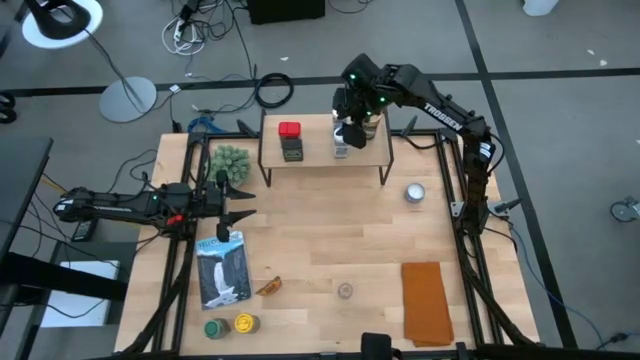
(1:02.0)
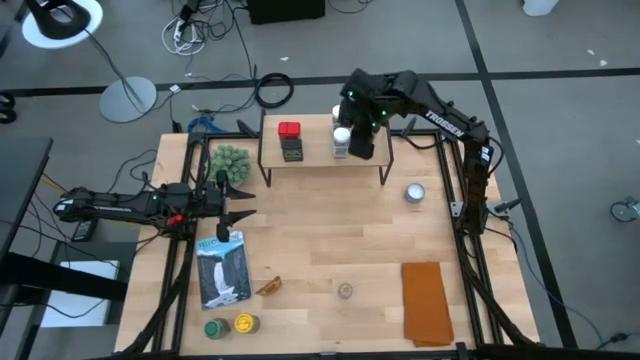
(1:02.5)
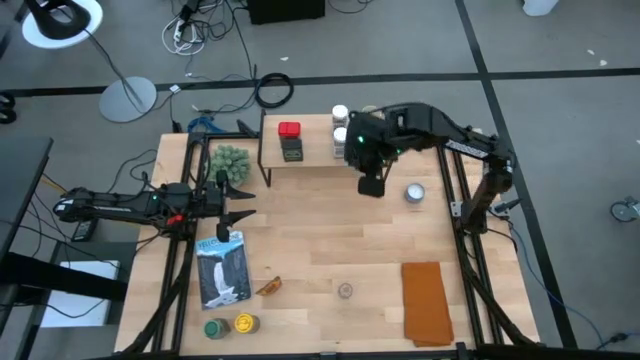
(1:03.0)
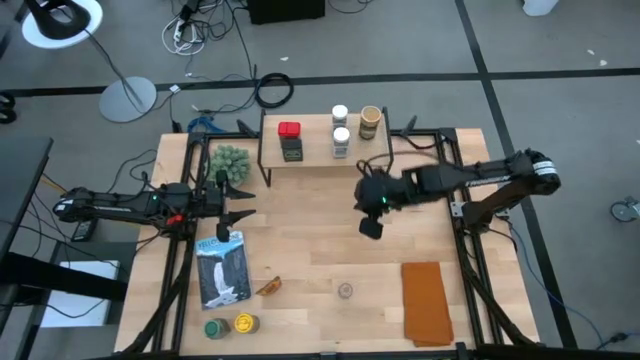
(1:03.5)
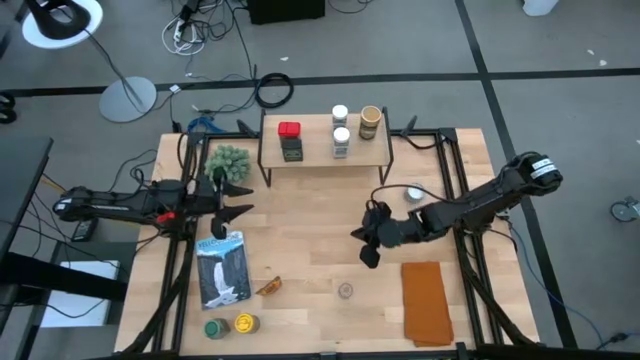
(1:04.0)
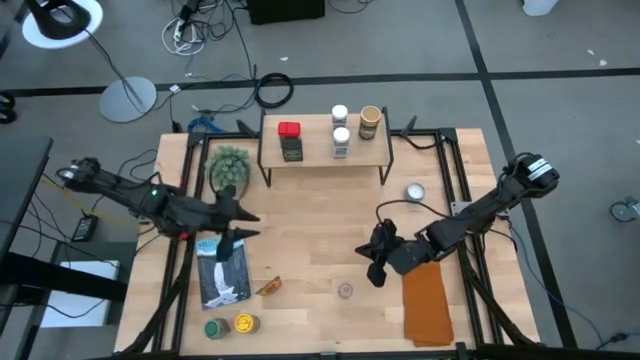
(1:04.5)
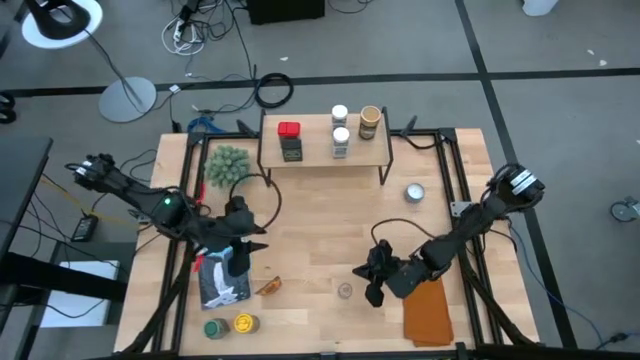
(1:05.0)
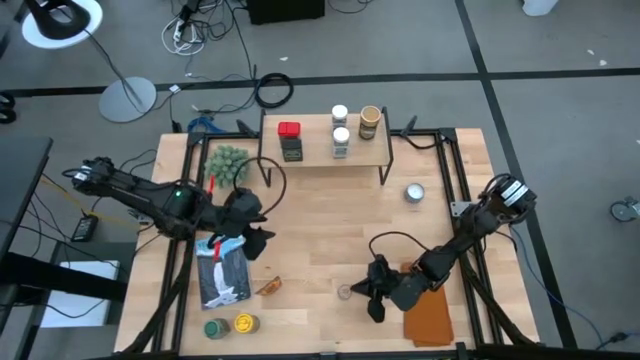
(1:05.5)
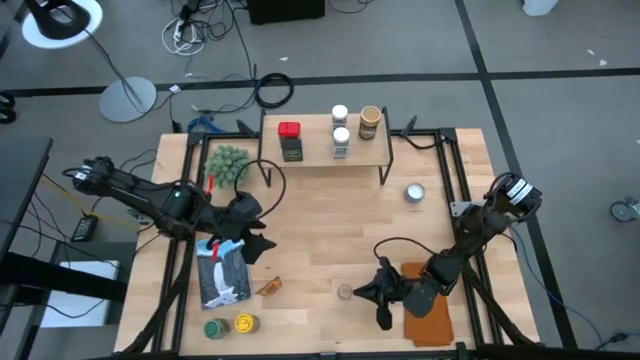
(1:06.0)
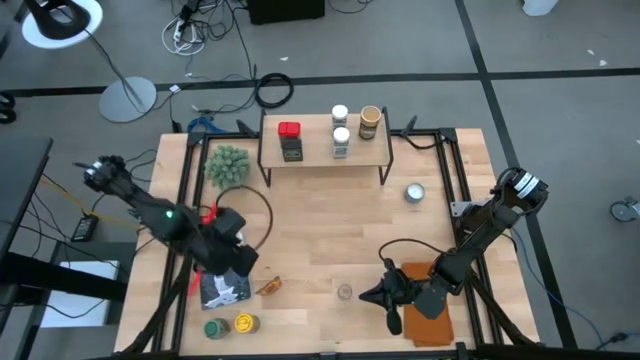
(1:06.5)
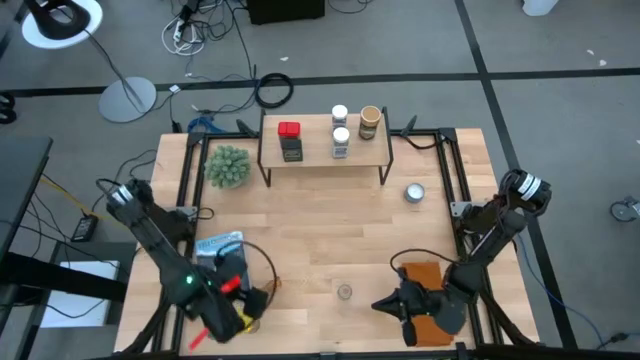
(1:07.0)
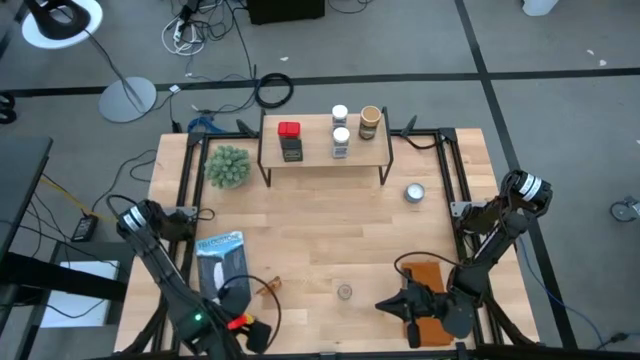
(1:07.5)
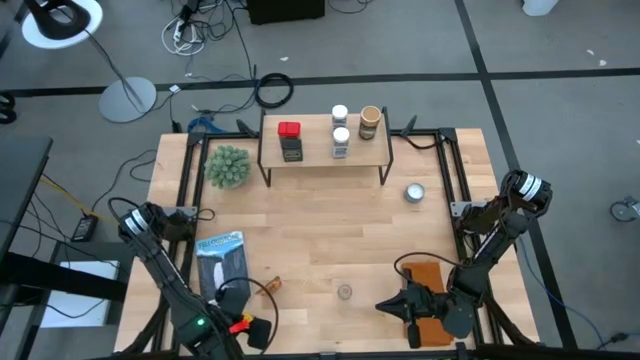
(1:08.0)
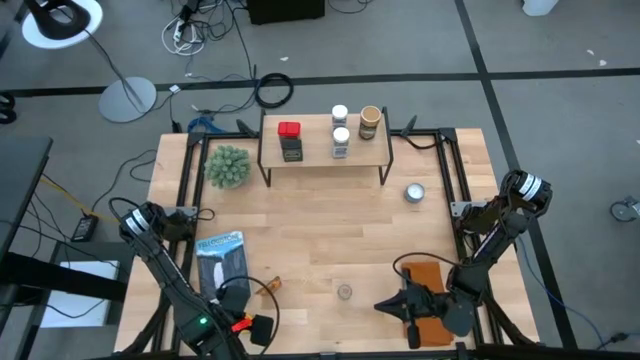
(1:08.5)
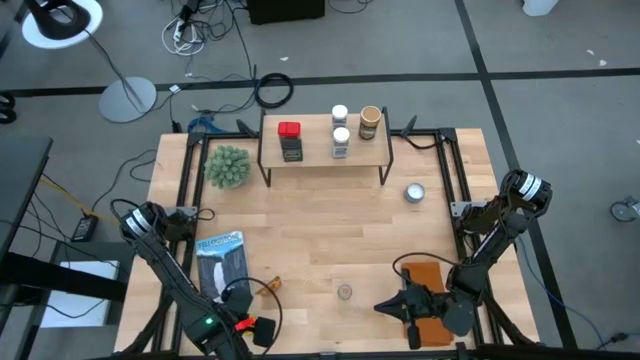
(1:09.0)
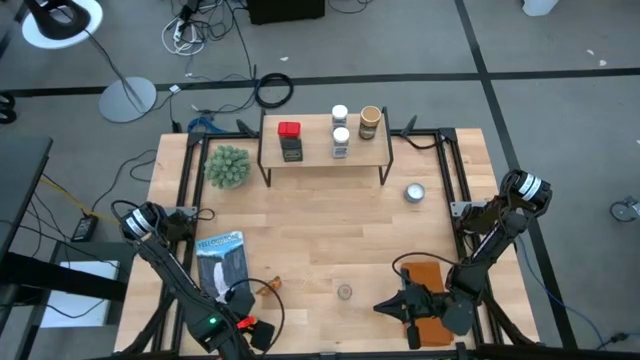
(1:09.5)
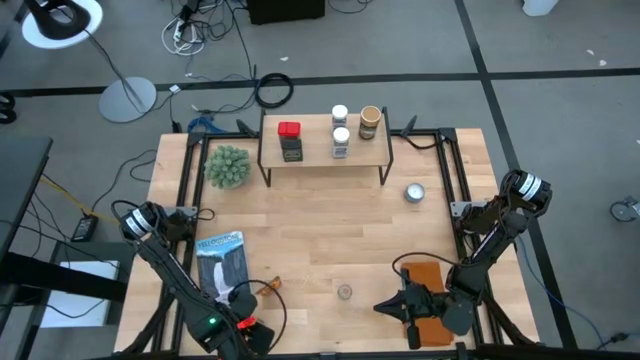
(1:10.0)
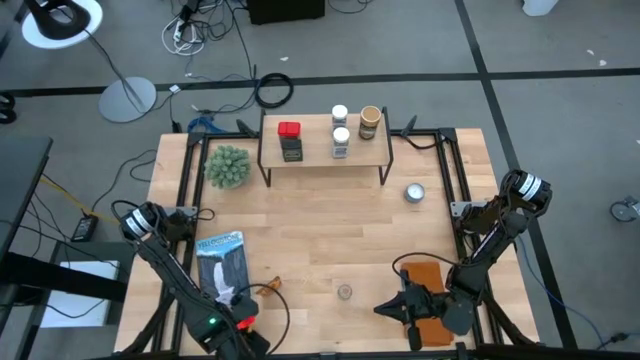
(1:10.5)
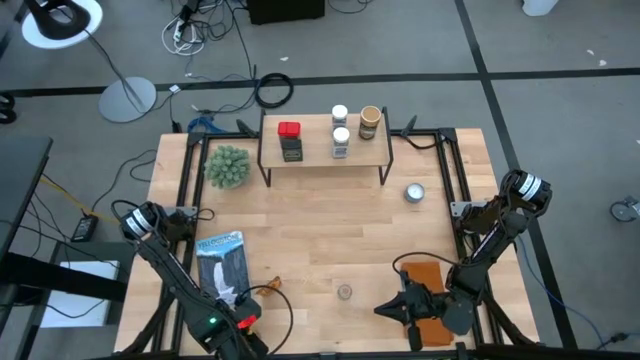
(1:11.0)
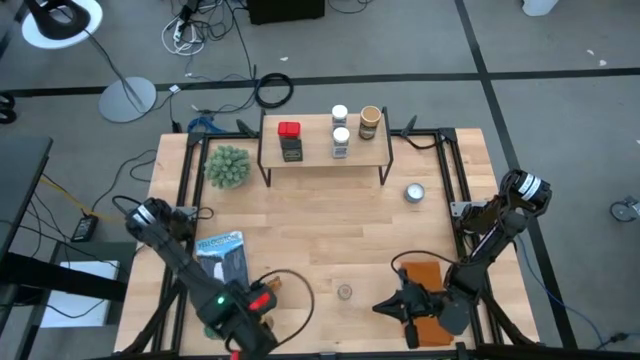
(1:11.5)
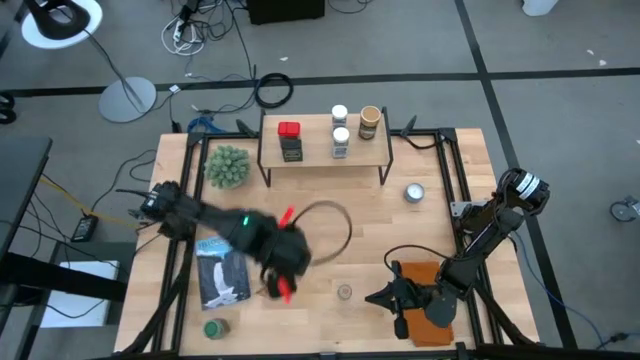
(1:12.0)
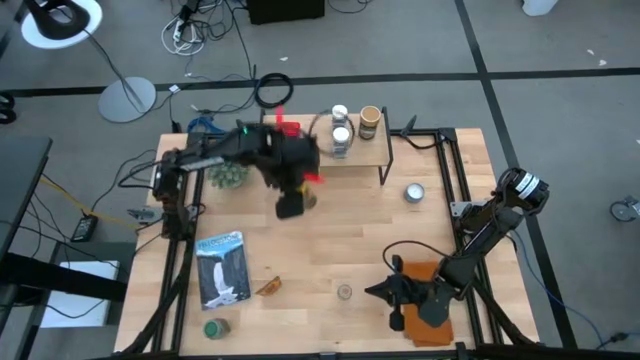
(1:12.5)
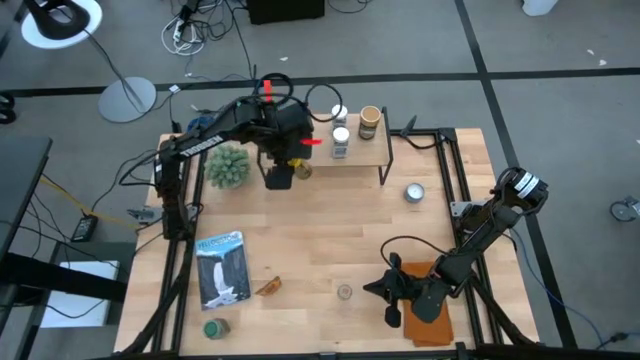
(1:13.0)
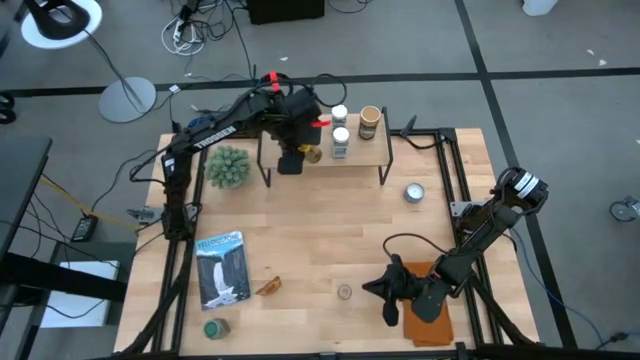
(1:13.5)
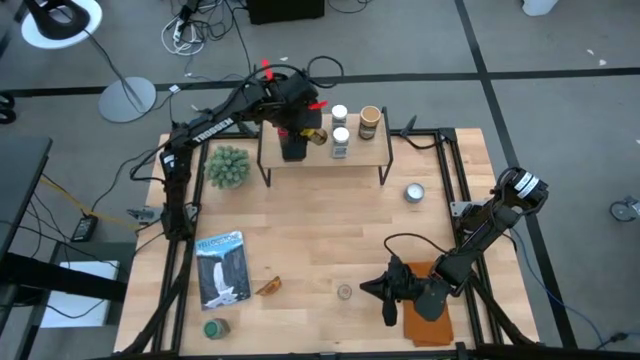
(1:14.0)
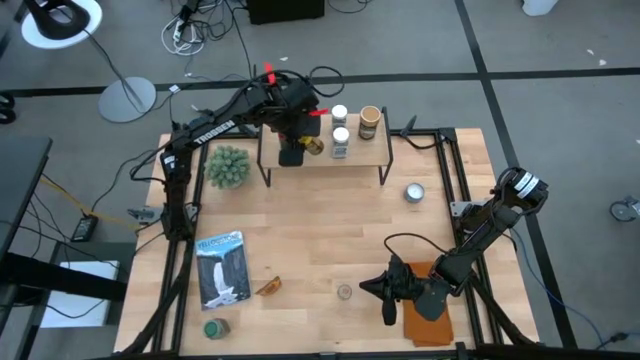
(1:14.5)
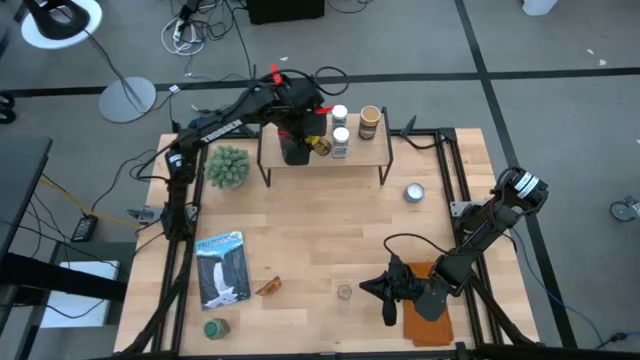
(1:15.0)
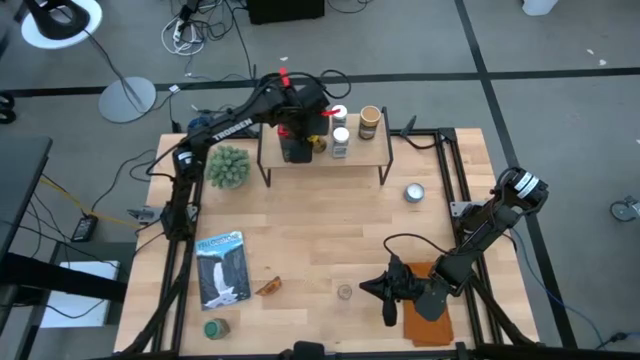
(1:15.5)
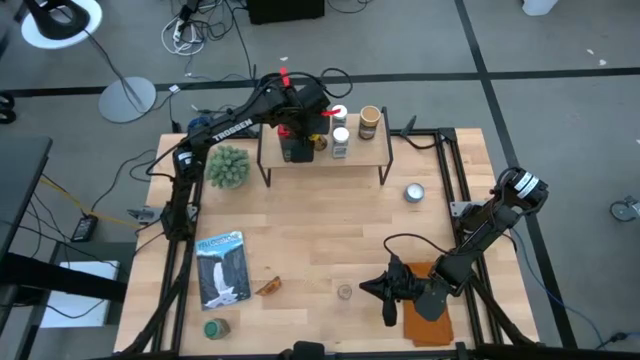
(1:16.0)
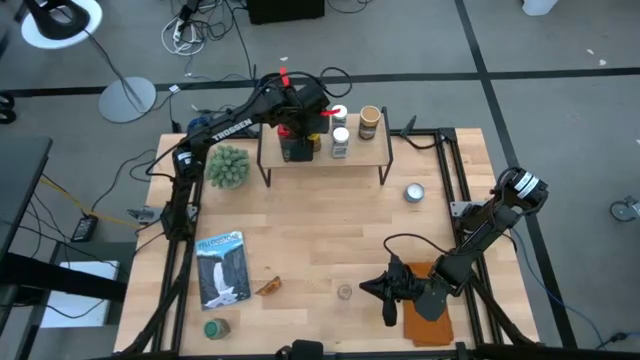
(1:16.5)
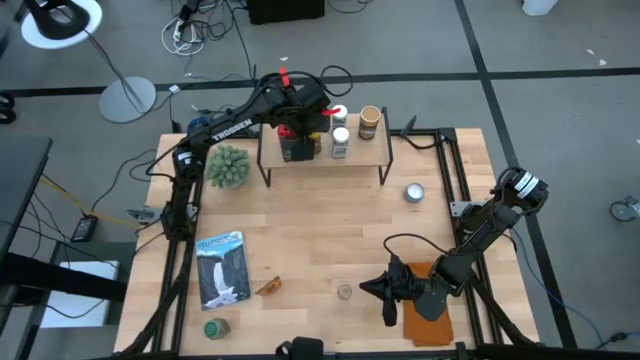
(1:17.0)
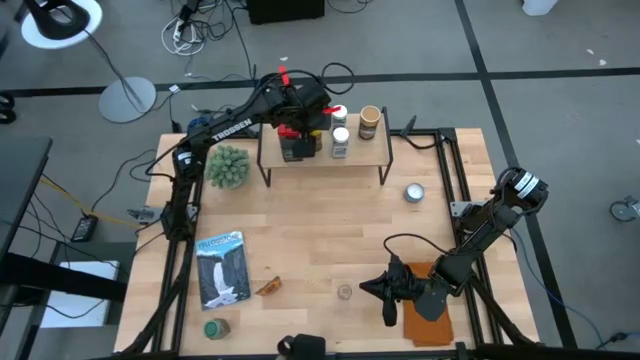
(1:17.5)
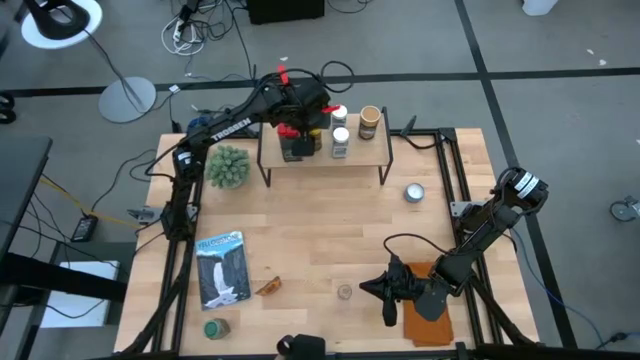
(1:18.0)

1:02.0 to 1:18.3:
Task: Shelf spices
Put the yellow seasoning bottle on the shelf

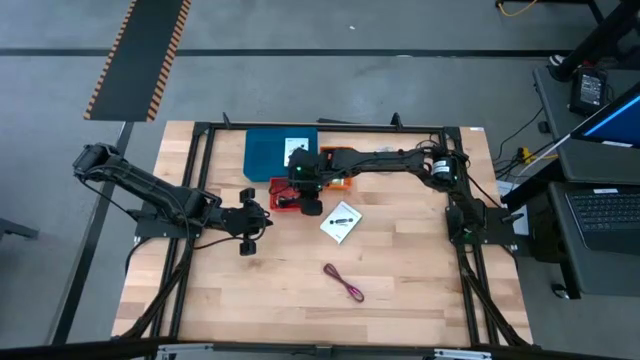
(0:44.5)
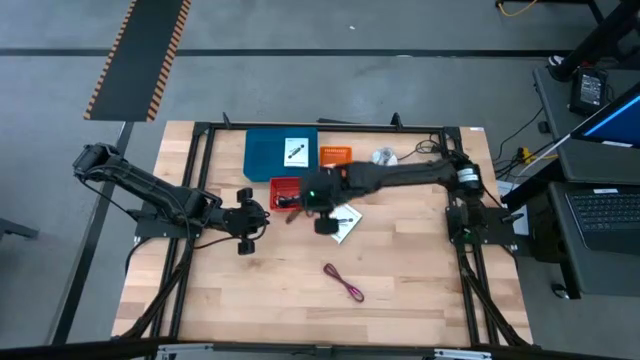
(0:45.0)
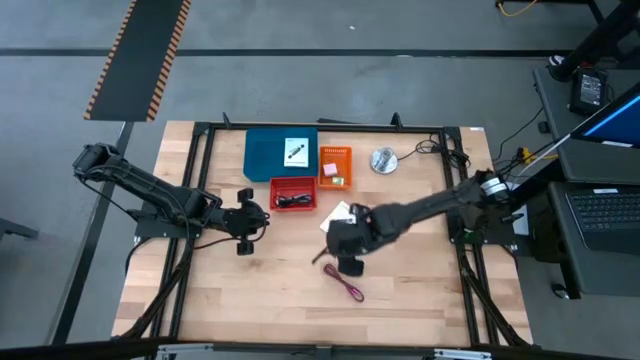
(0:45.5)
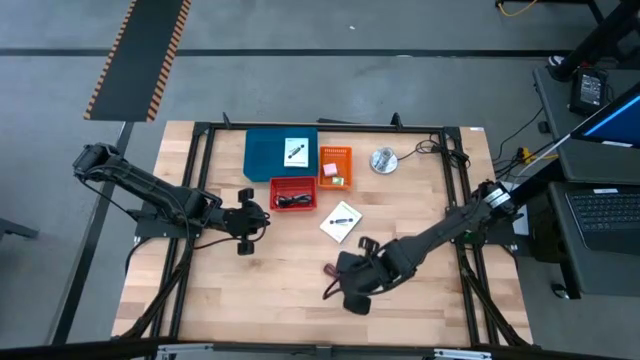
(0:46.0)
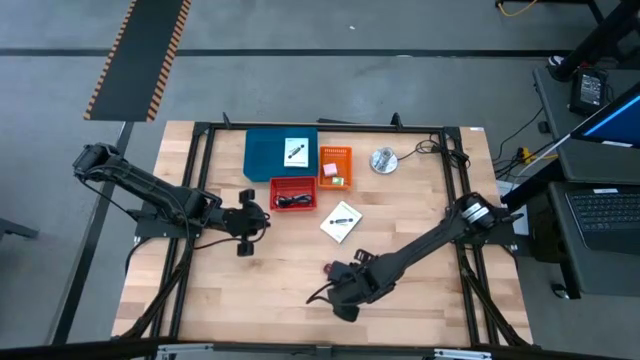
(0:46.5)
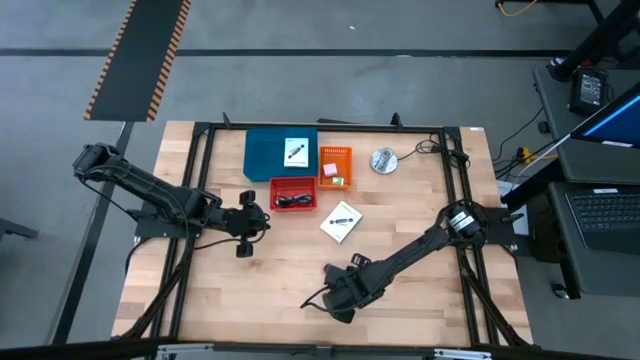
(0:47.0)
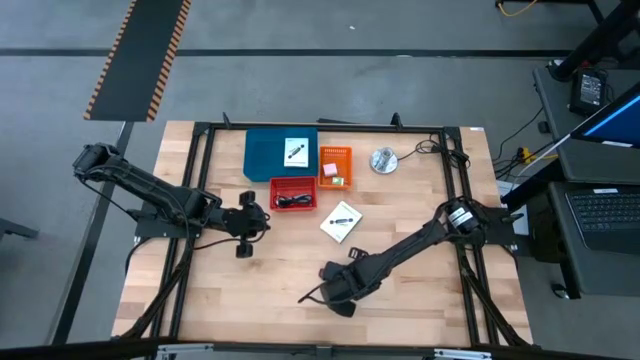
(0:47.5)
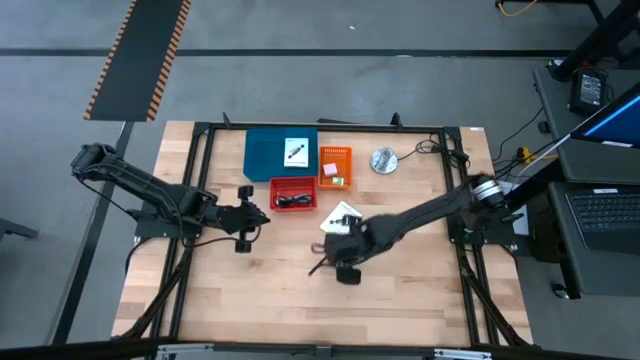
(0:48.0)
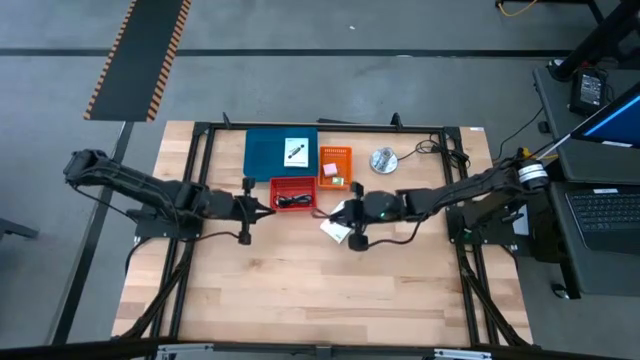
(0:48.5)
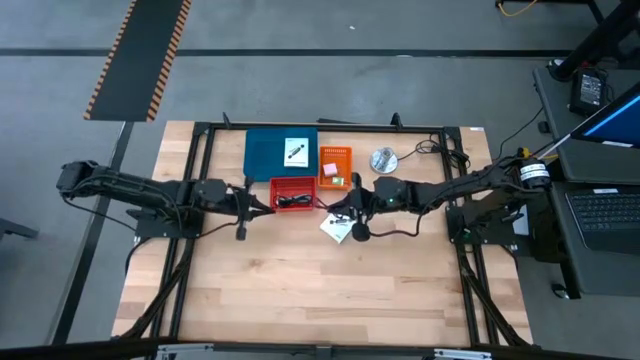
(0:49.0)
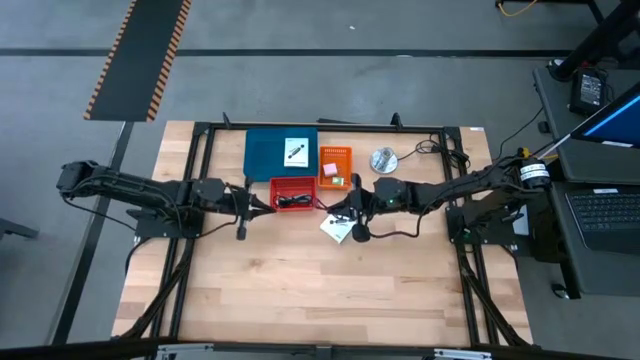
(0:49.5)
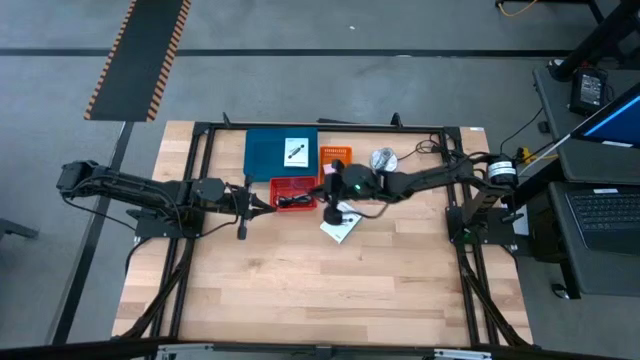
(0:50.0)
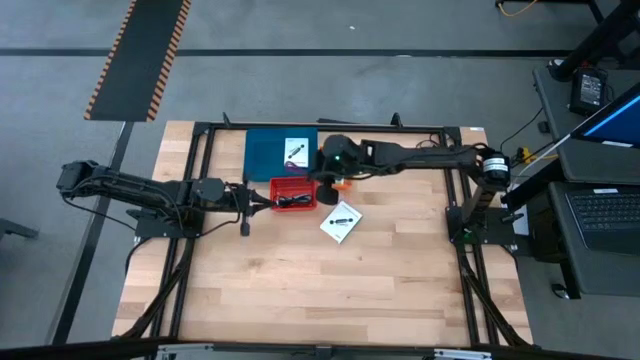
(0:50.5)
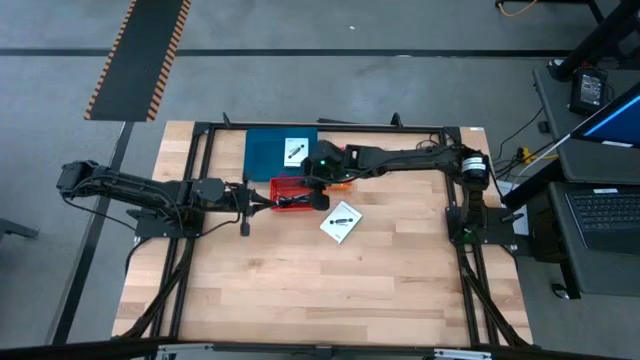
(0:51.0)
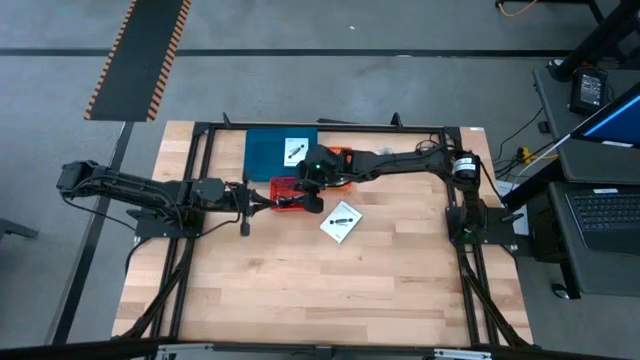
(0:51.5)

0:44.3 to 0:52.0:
Task: Pick and place items into bin
Put the pink charger cable into the red bin
